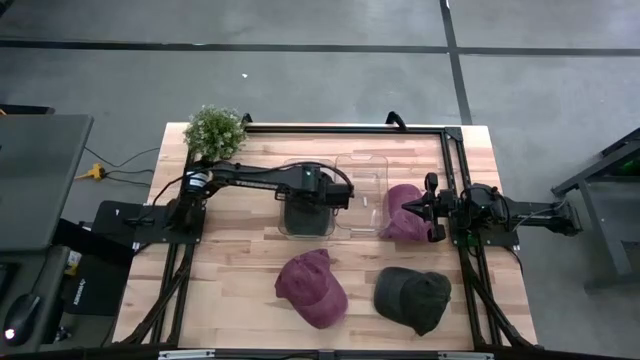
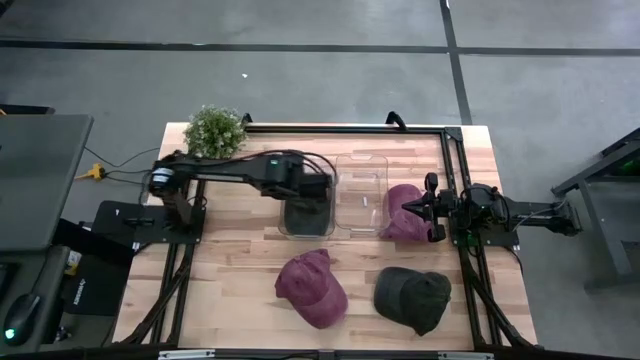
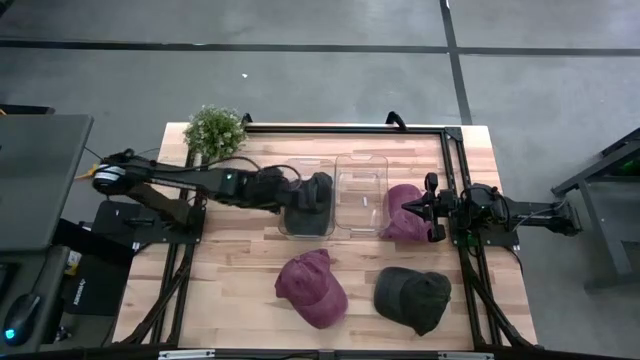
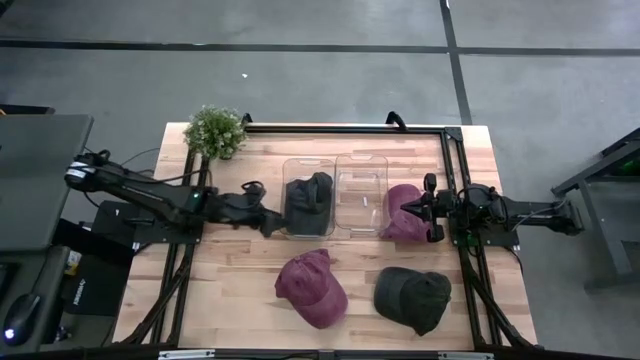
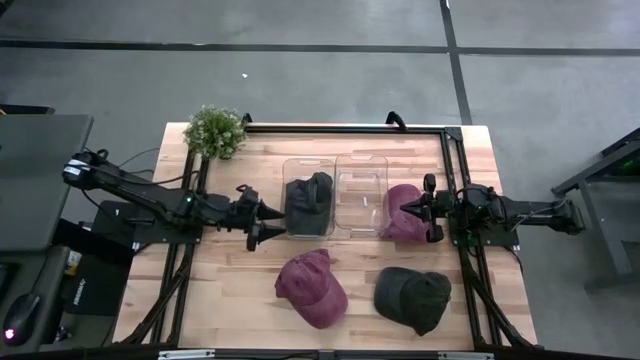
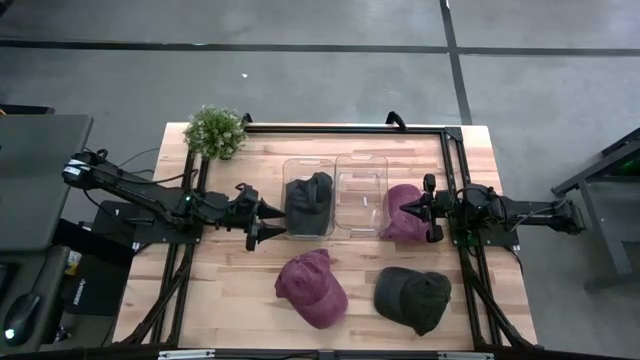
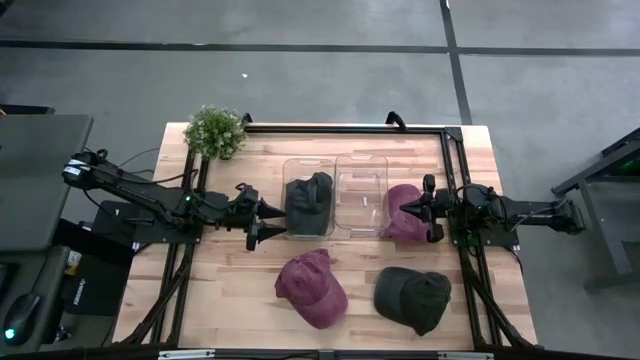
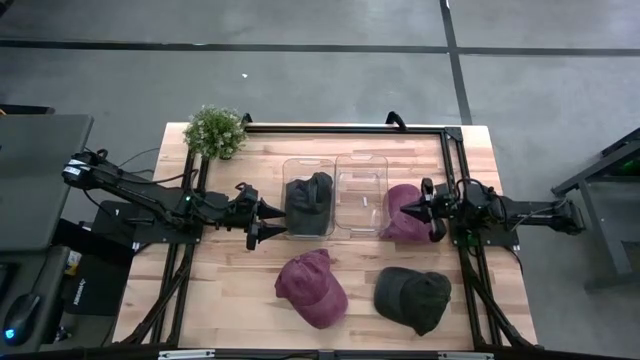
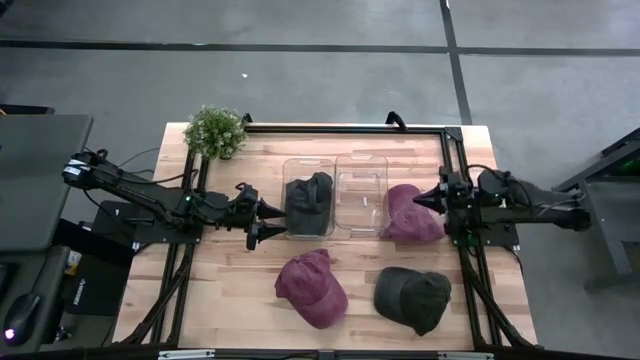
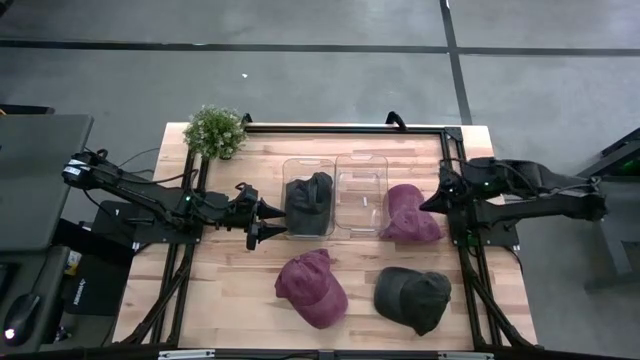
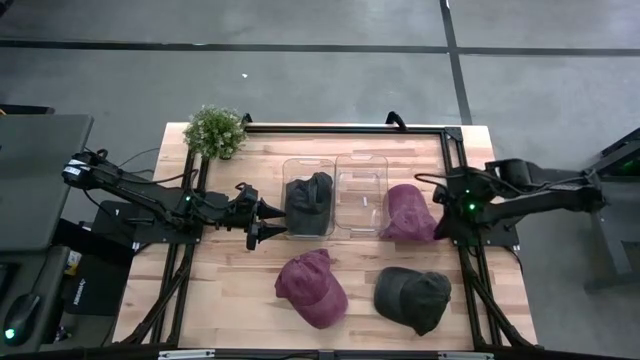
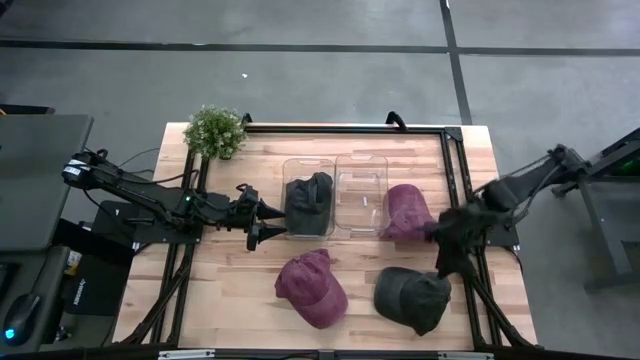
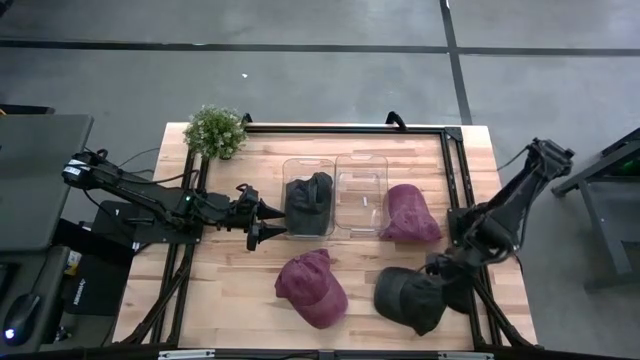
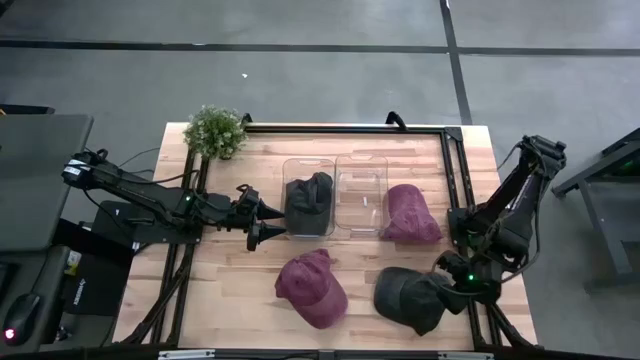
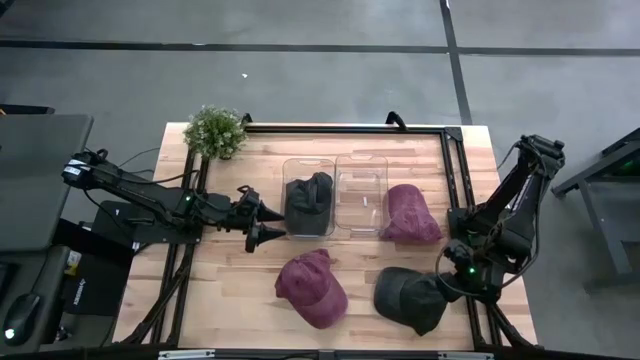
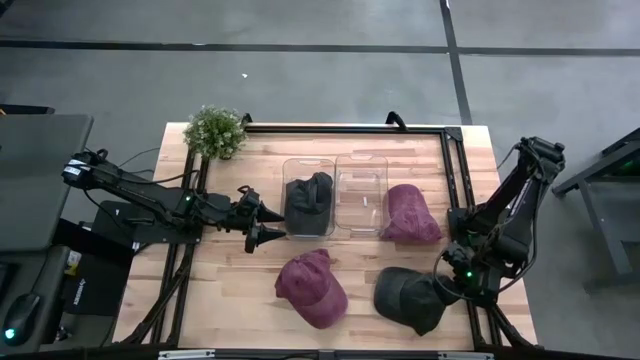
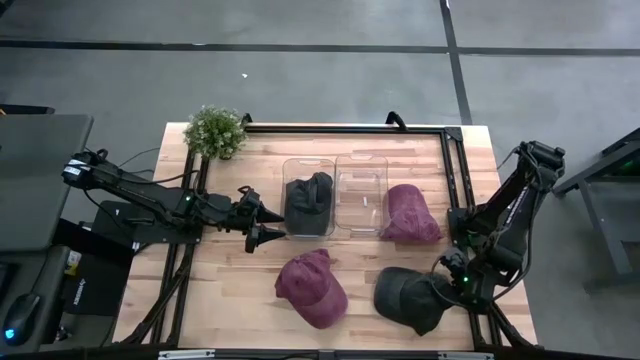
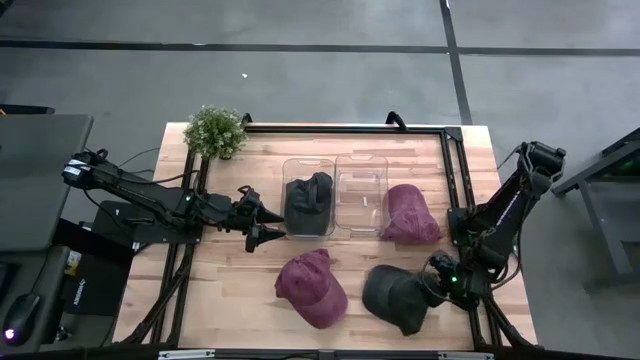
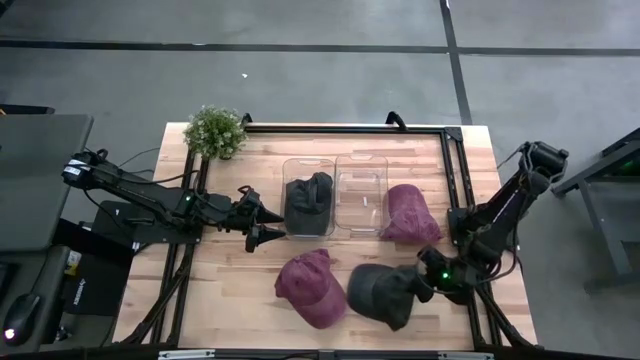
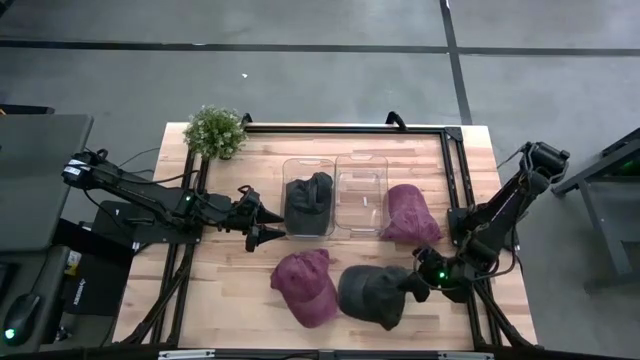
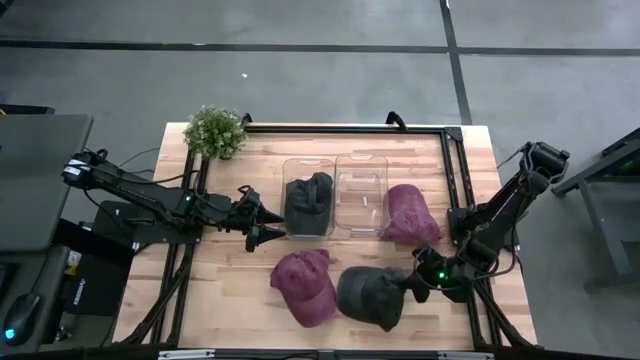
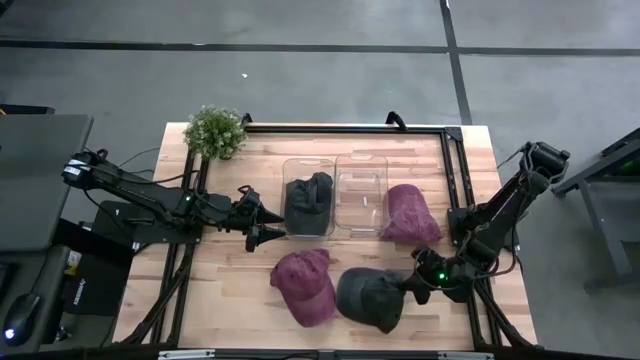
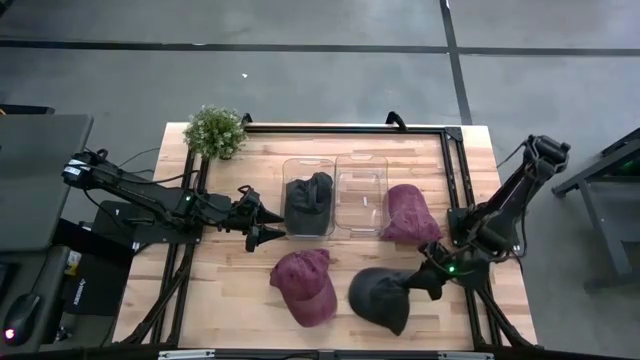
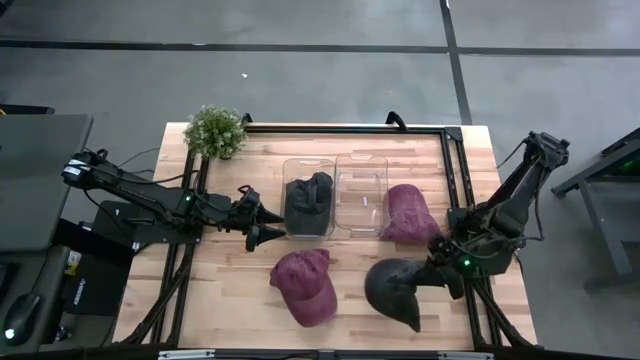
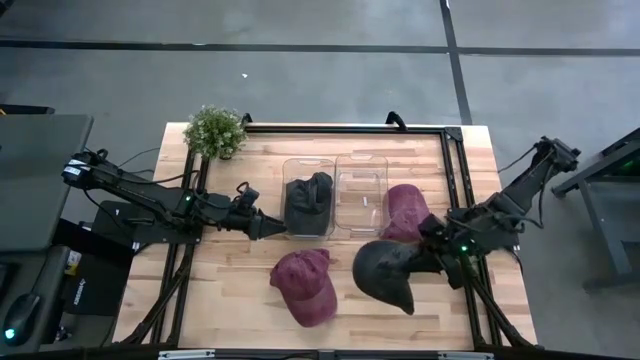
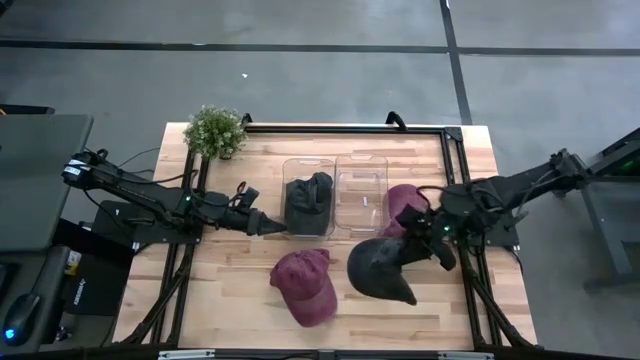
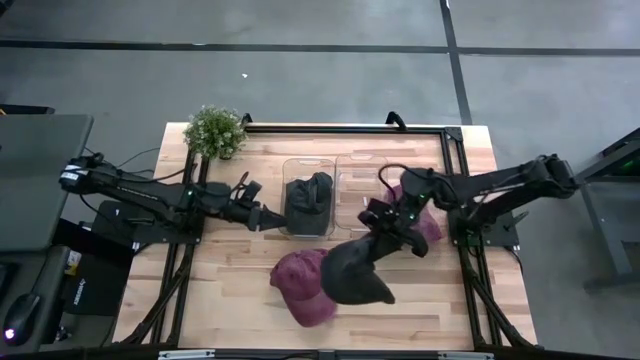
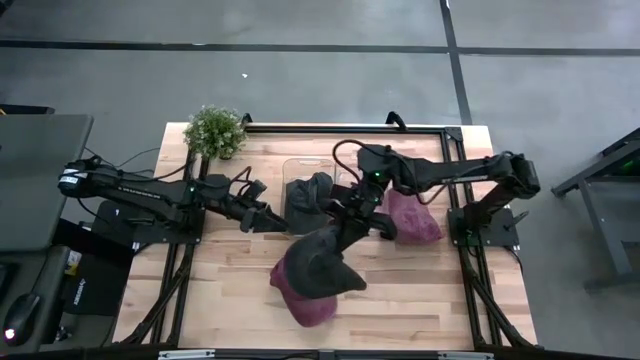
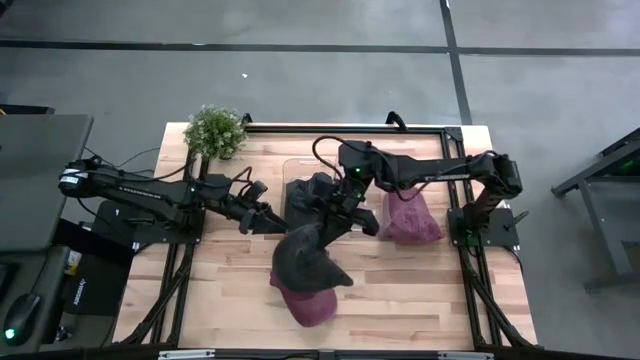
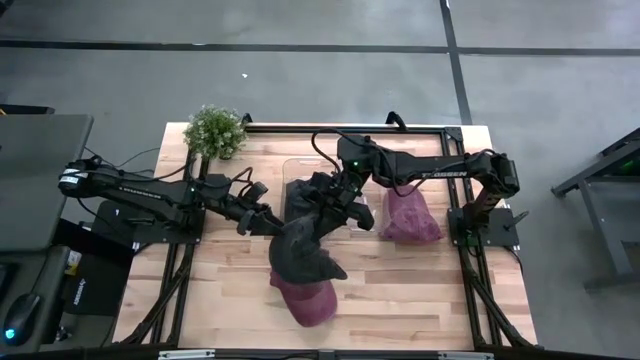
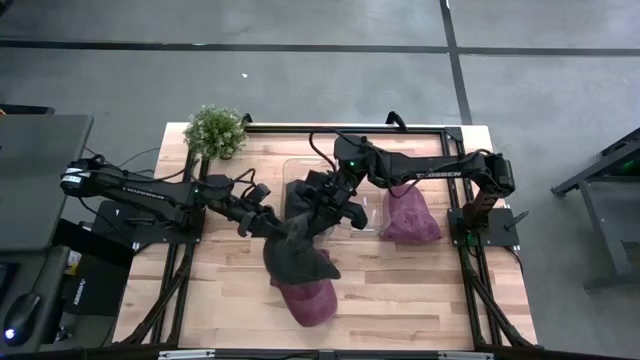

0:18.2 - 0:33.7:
Task: Pick & Place hat
Put the black cap into the left transparent bin

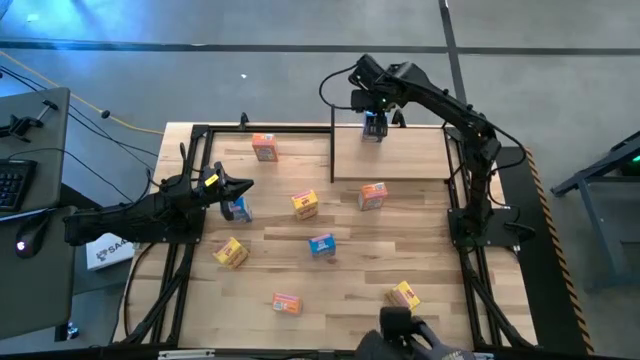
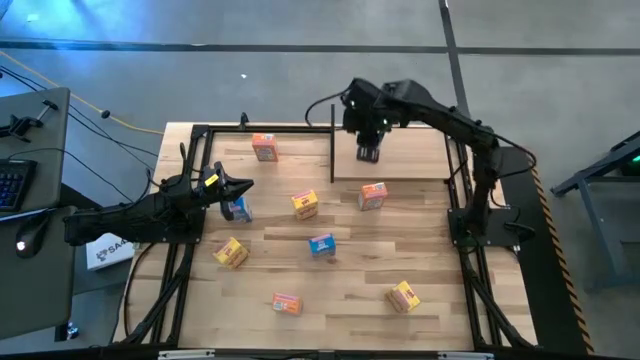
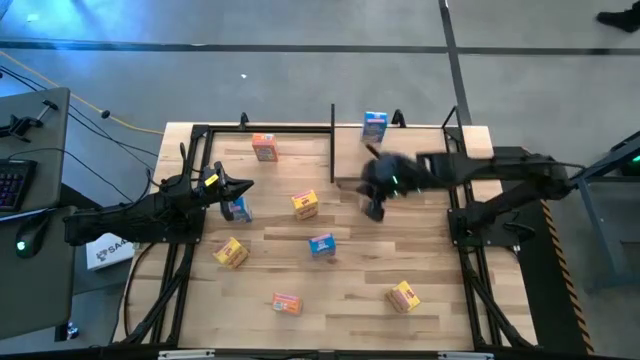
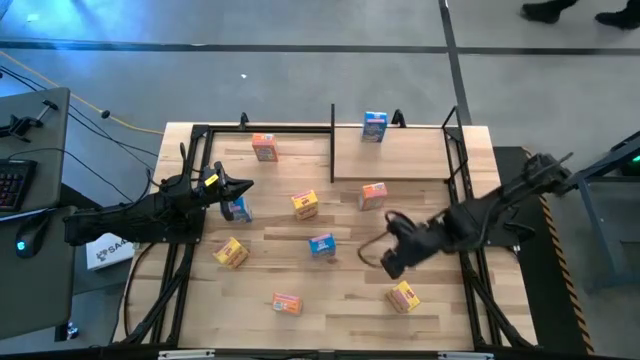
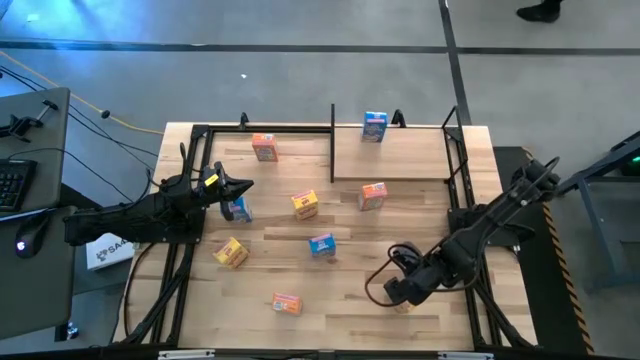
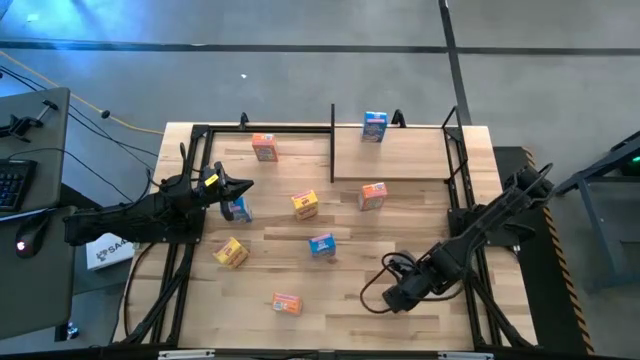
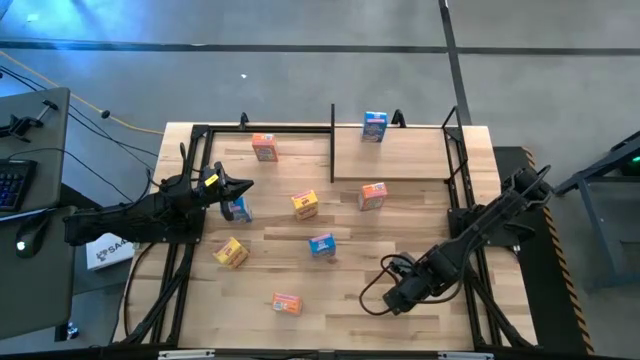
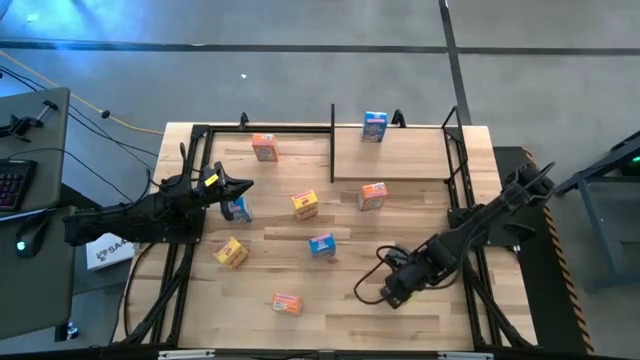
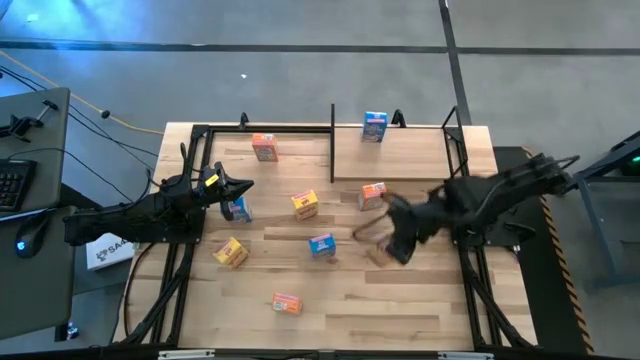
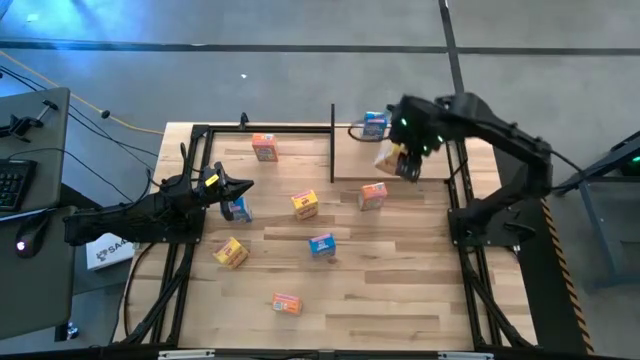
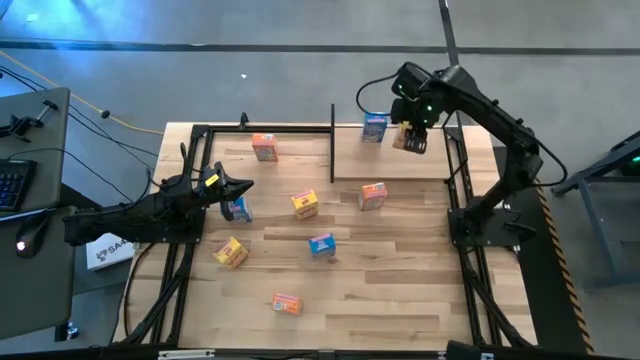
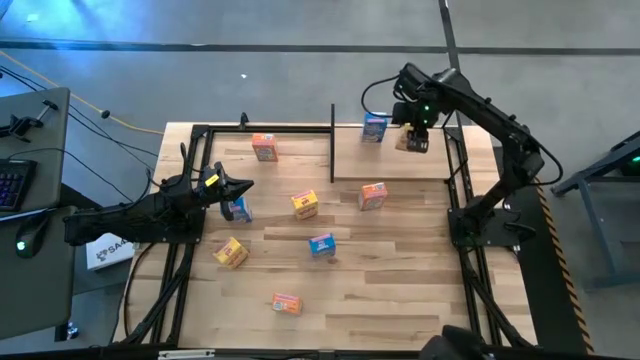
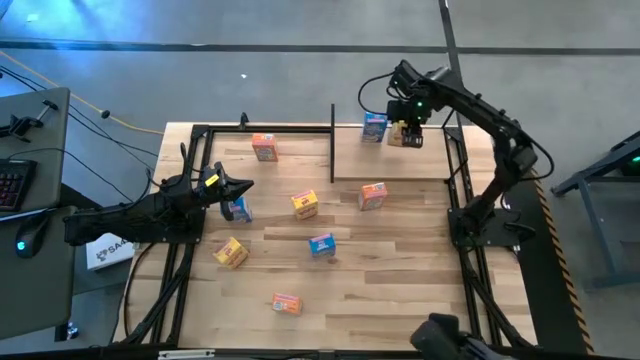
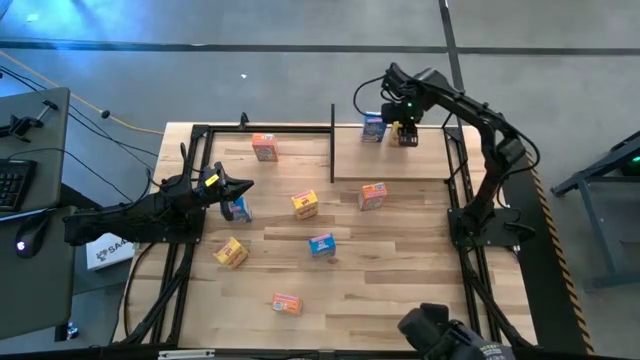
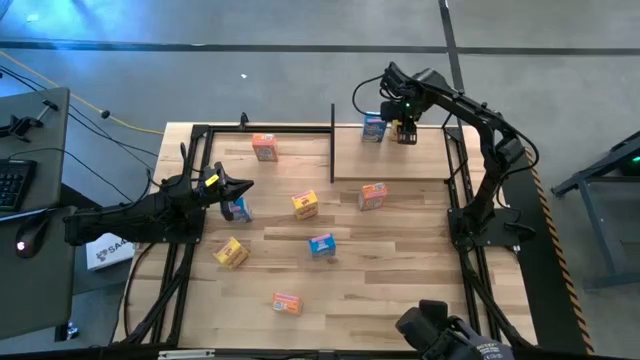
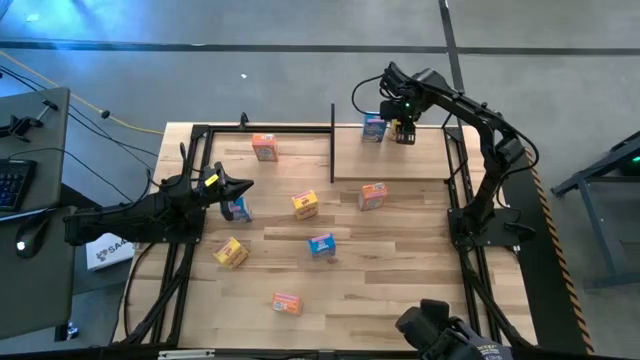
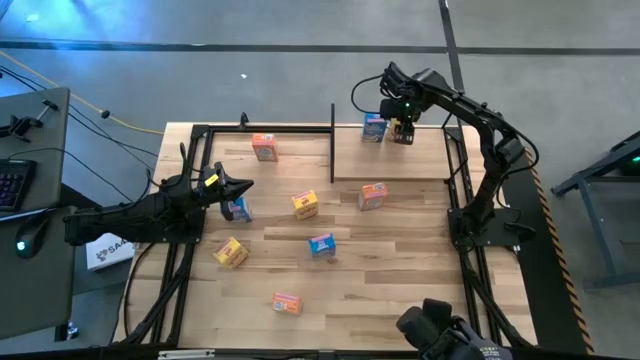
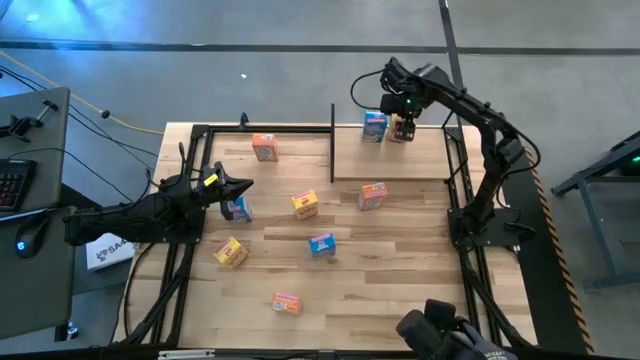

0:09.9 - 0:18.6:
Task: Stack cereal on shelf
Put the bottom right yellow cereal box on the shelf aligned with the other blue cereal box
